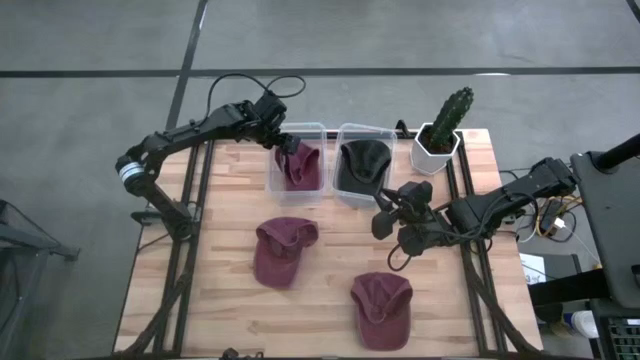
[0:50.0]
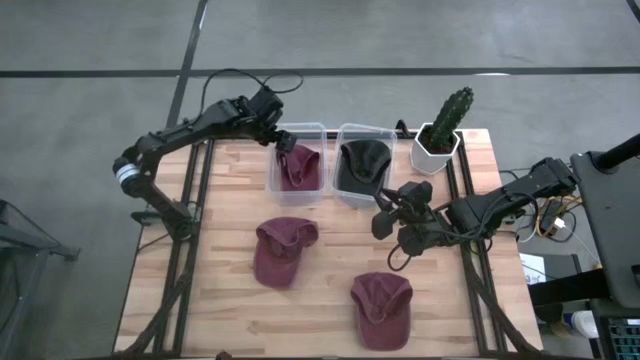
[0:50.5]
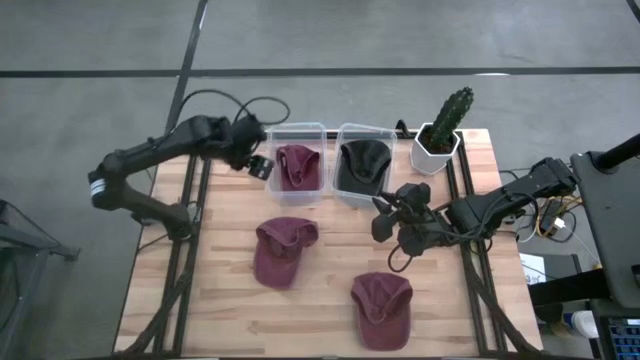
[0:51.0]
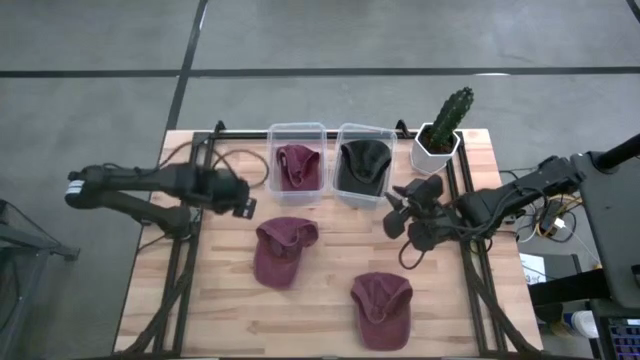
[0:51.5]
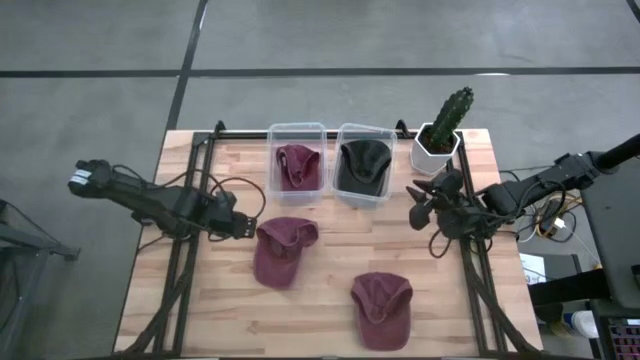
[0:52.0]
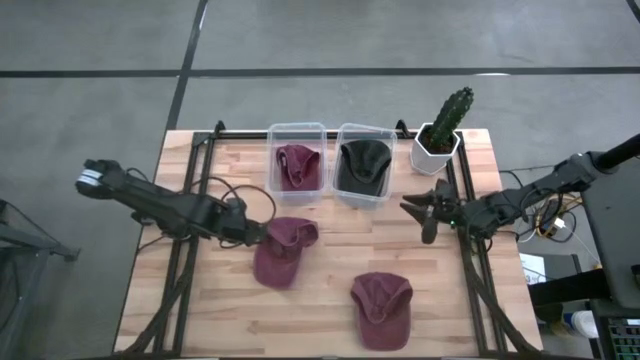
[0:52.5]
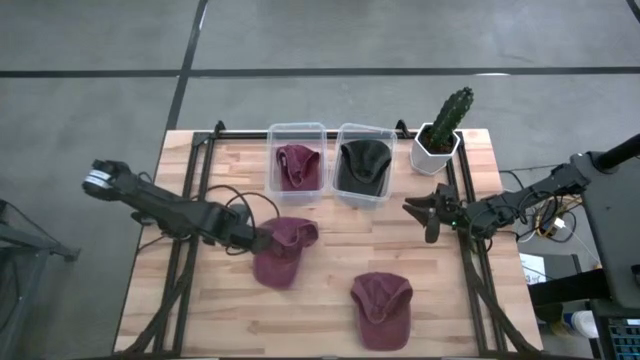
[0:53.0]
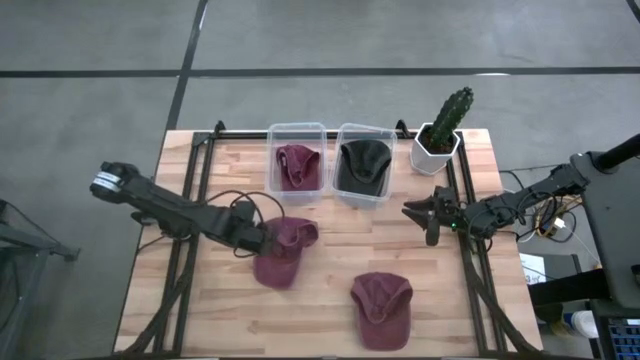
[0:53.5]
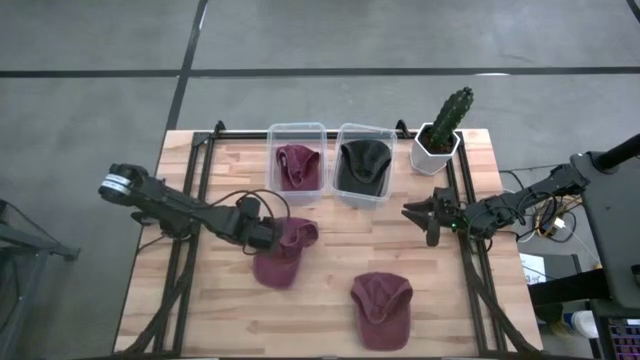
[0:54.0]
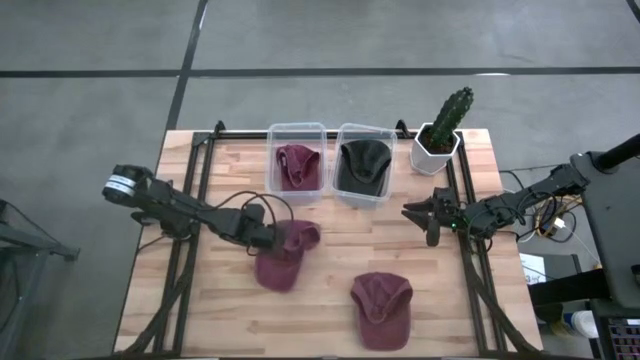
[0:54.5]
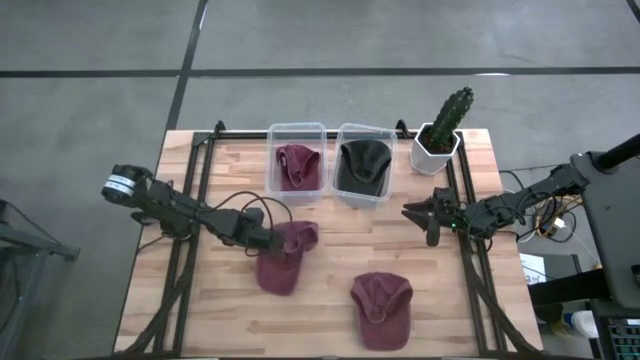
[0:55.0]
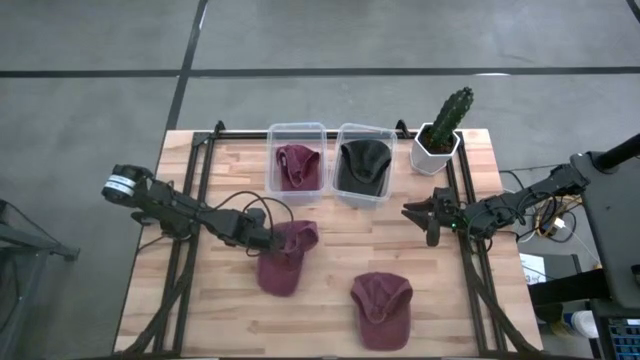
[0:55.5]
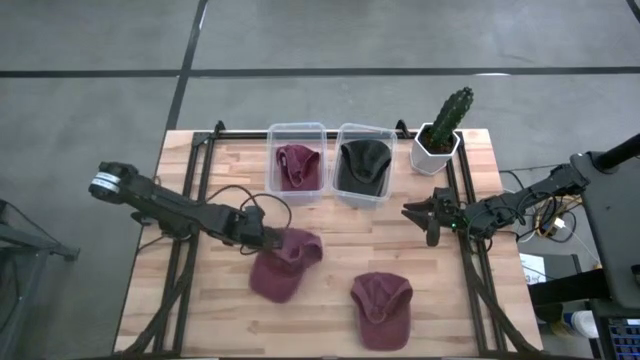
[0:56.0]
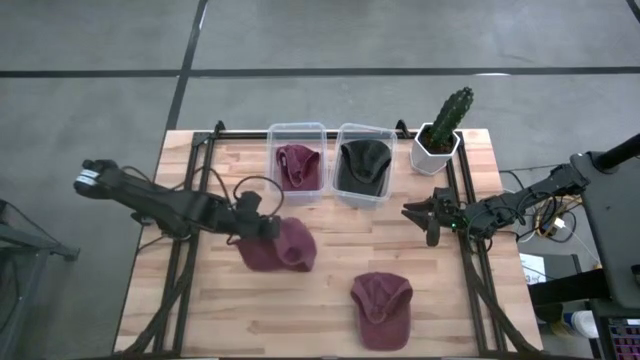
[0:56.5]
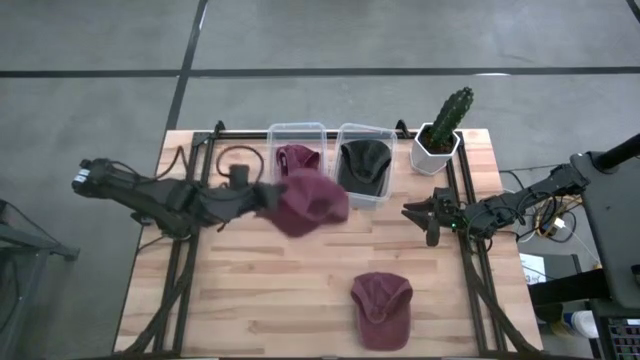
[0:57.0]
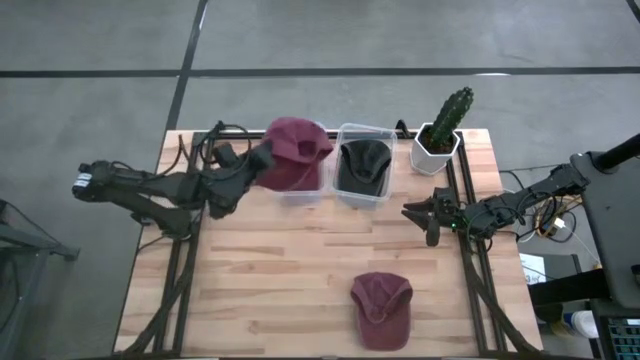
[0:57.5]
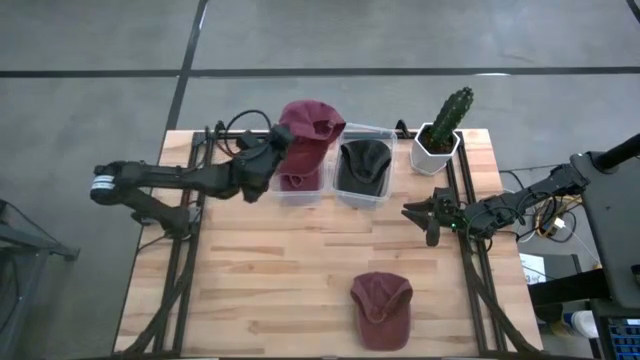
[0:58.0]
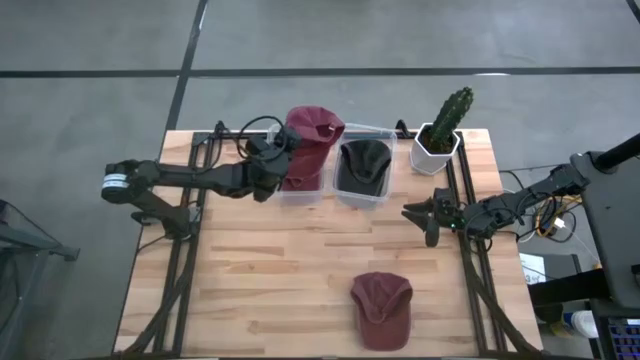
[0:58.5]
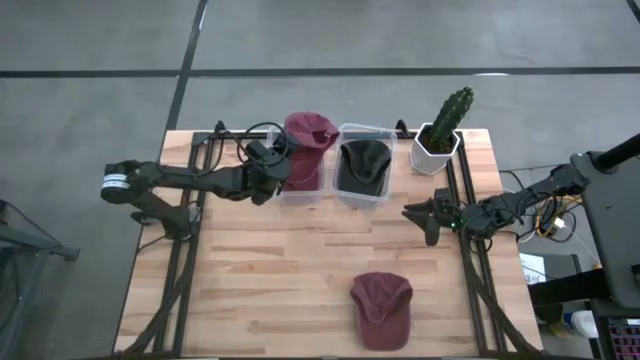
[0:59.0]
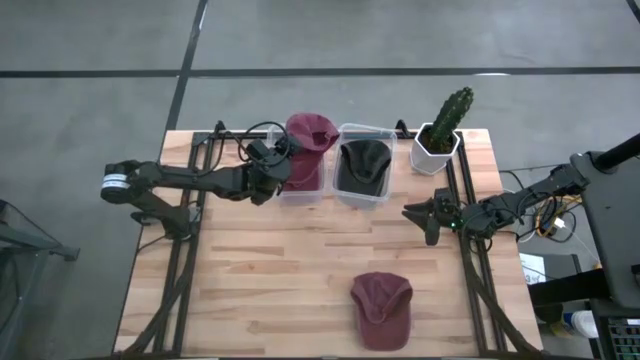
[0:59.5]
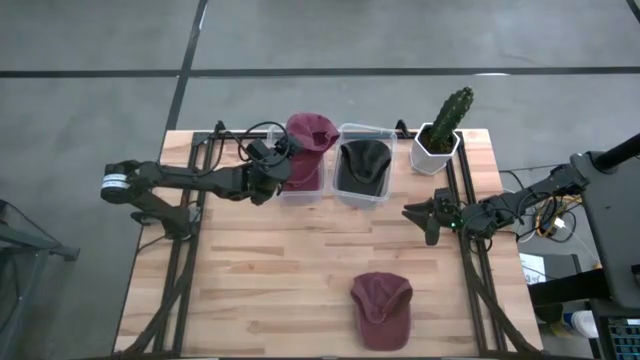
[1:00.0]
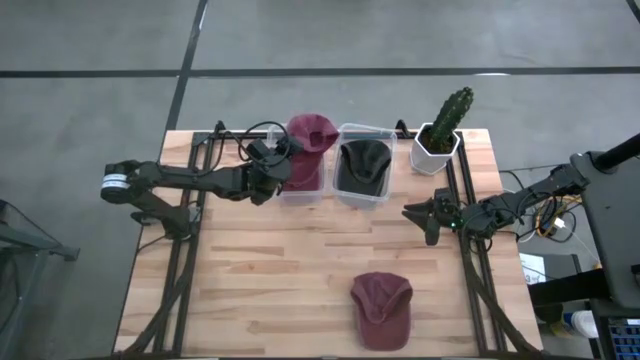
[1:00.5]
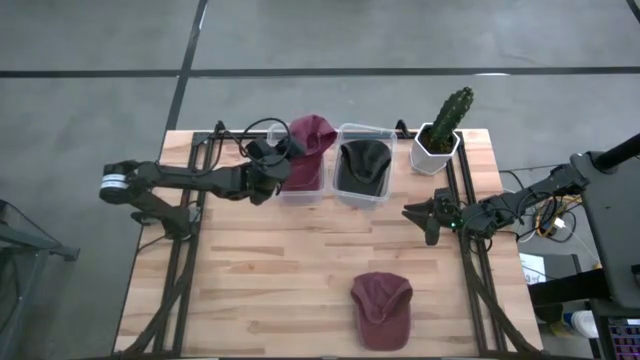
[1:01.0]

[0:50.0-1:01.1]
Task: Pick & Place hat
Put the left red cap into the left transparent bin

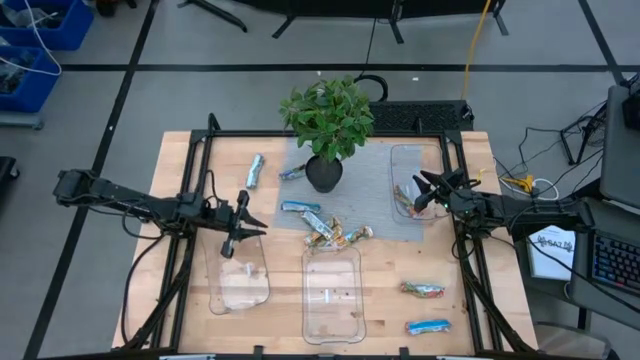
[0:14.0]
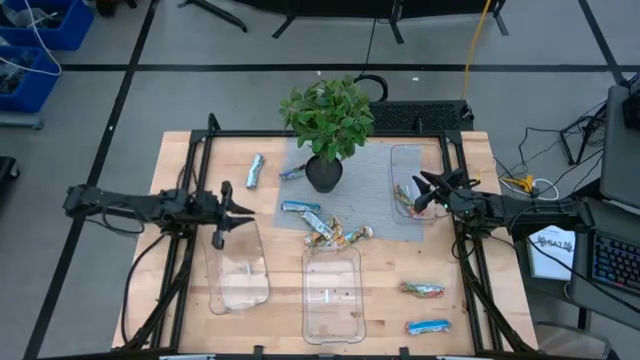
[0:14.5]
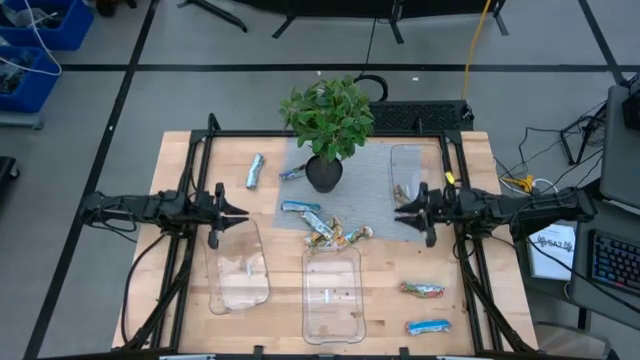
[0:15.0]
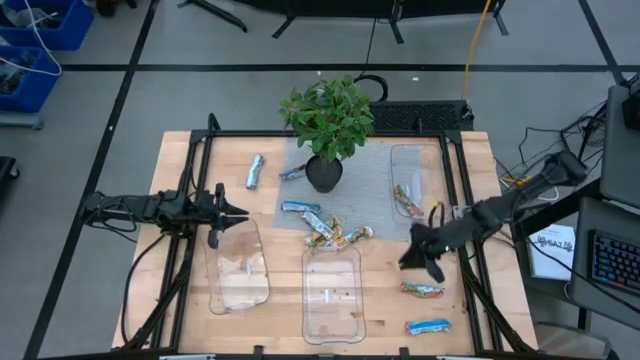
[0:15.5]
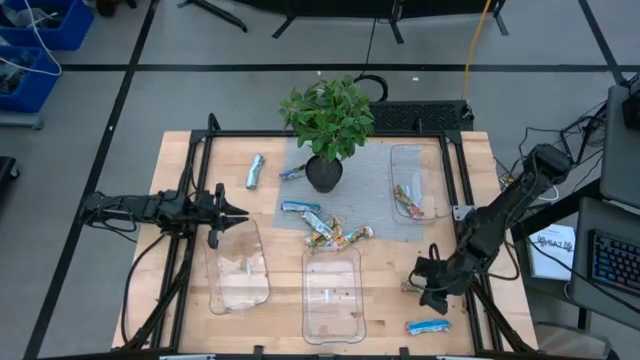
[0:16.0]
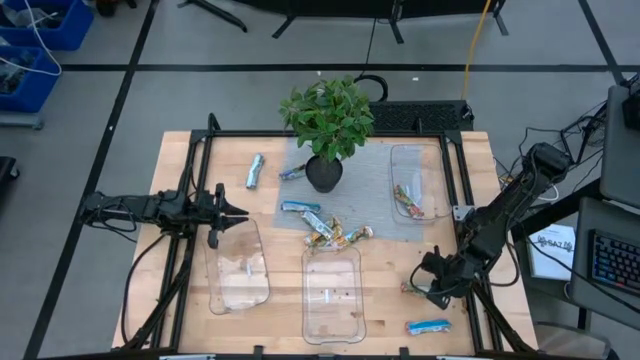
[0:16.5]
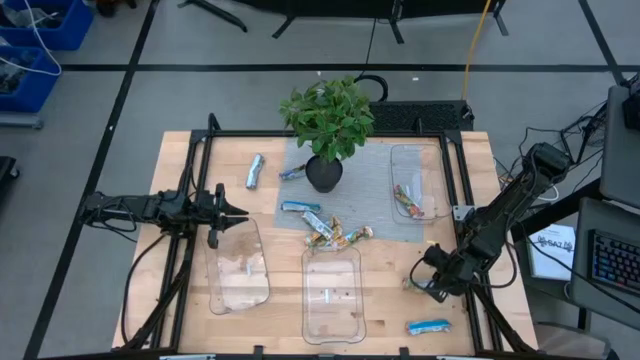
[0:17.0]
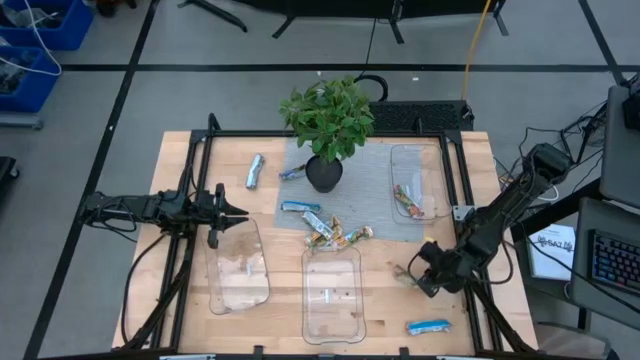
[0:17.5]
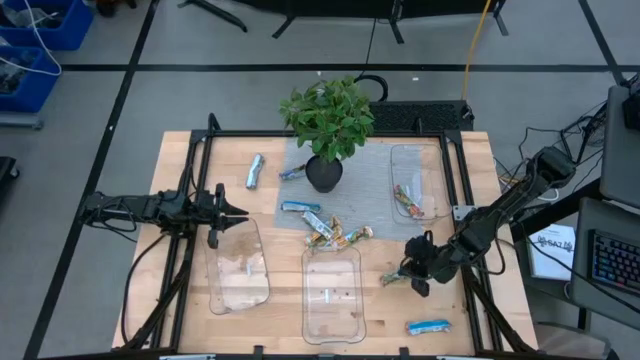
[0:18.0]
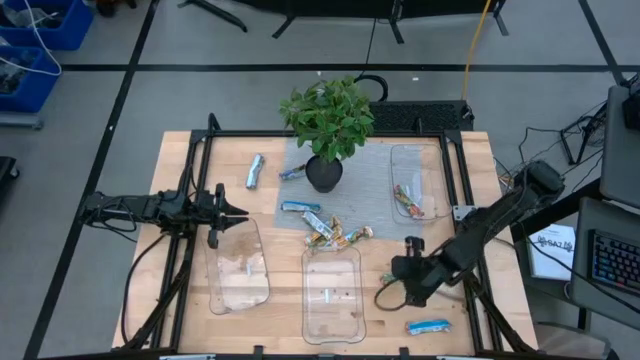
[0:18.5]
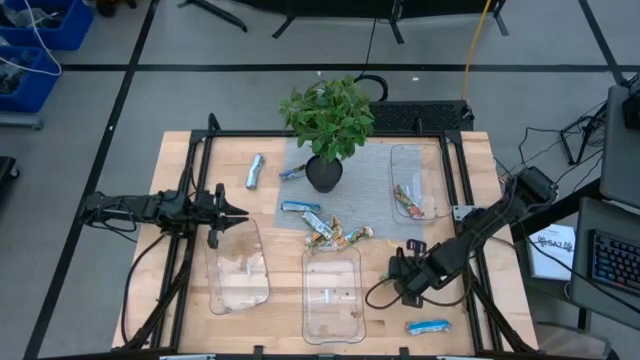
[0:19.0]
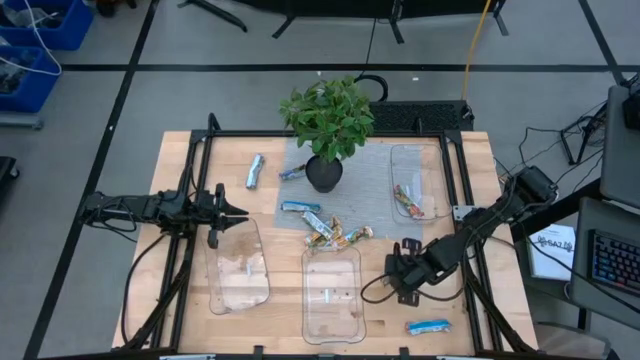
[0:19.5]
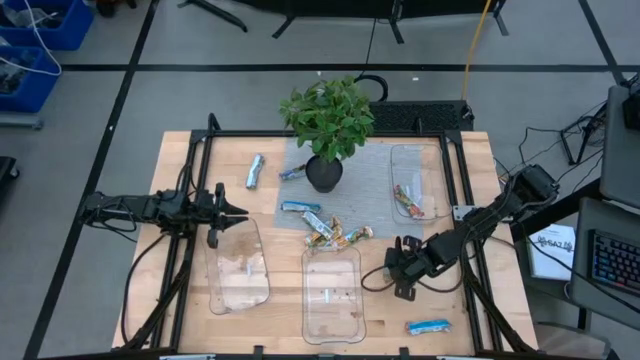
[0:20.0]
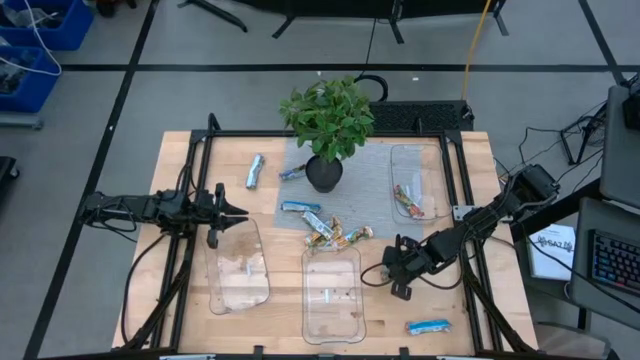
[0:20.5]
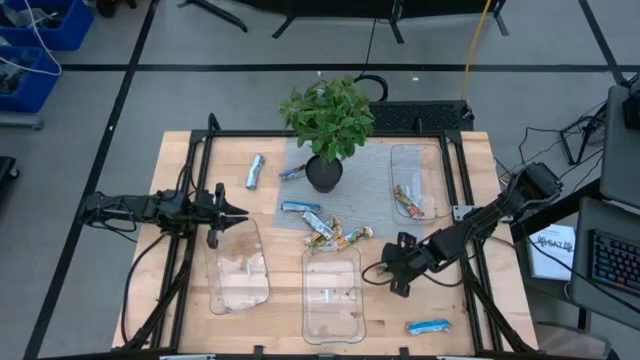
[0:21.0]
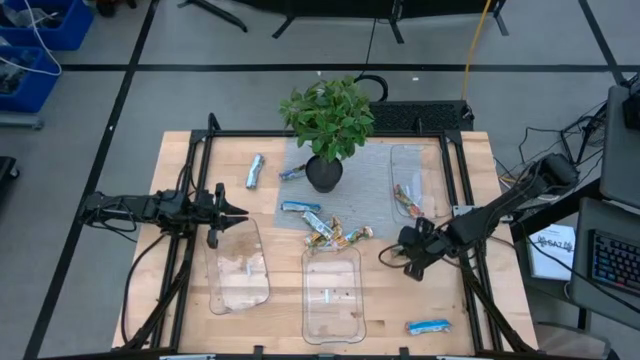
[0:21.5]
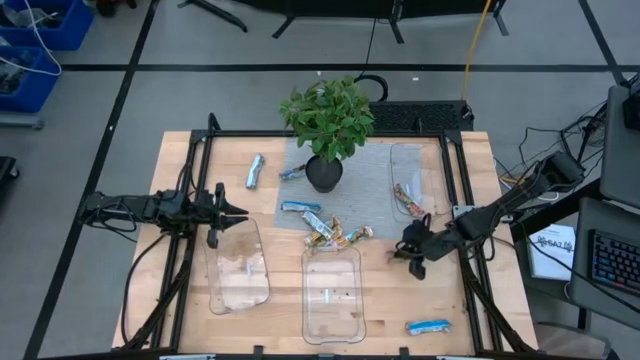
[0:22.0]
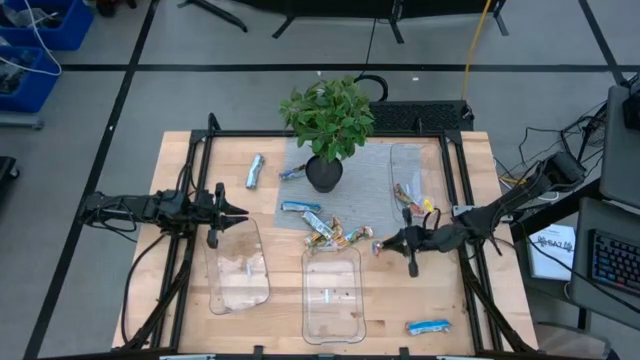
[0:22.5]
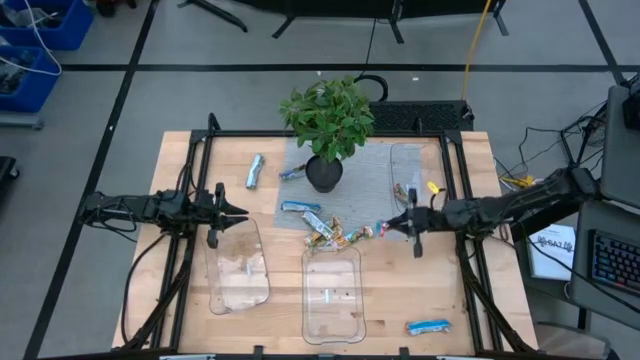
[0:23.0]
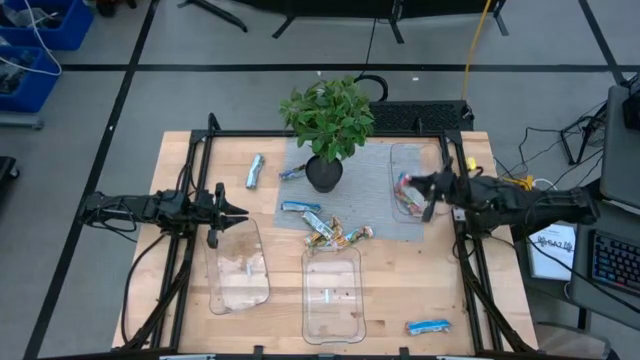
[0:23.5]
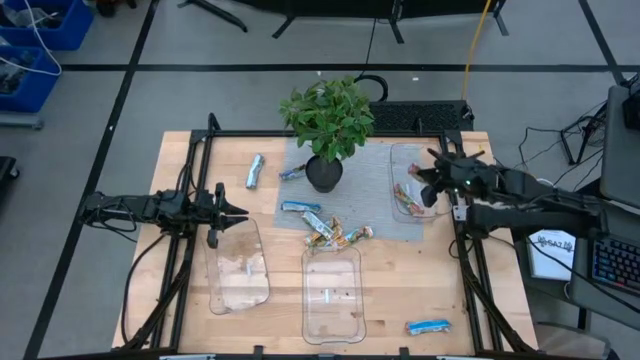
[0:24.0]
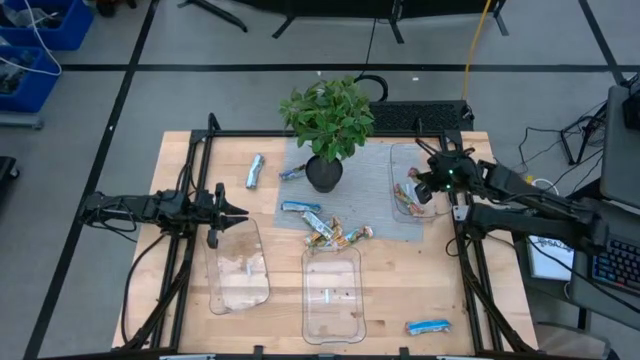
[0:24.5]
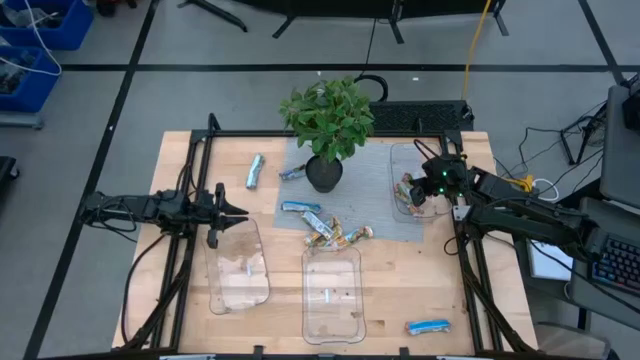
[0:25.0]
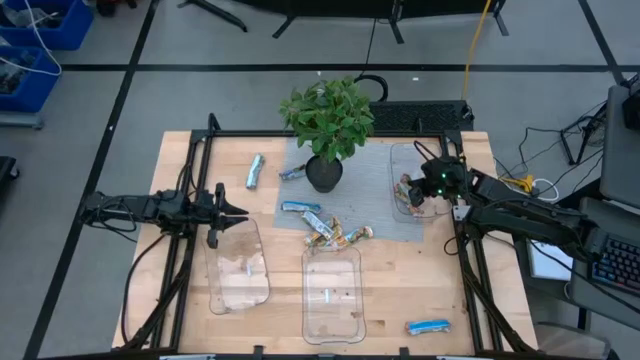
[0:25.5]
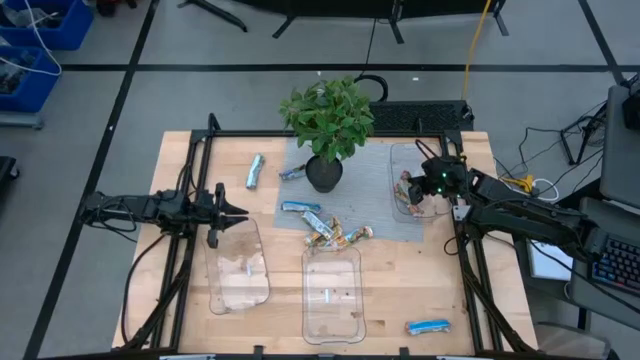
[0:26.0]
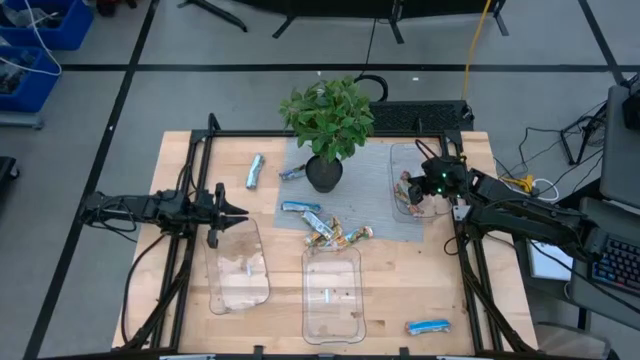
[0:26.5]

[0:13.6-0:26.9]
Task: Pick and place Granola Bars by type
Put the top red granola bar into the right transparent bin
